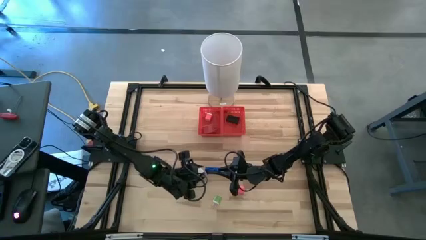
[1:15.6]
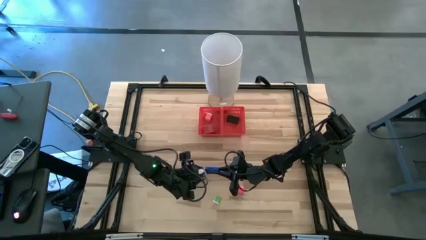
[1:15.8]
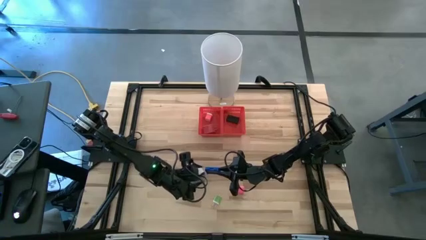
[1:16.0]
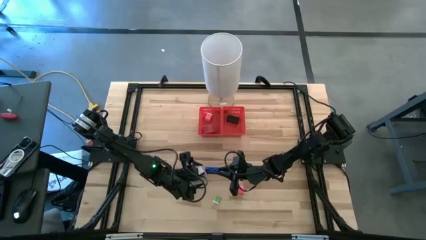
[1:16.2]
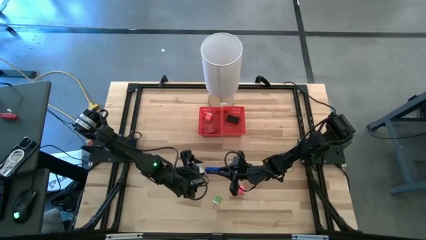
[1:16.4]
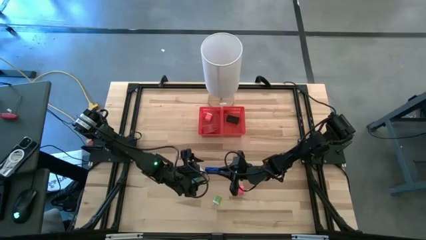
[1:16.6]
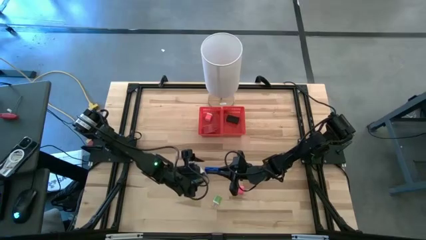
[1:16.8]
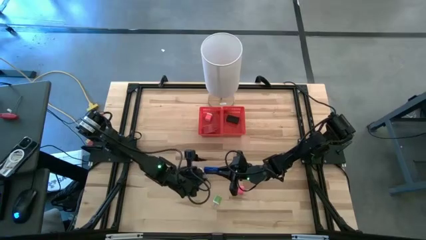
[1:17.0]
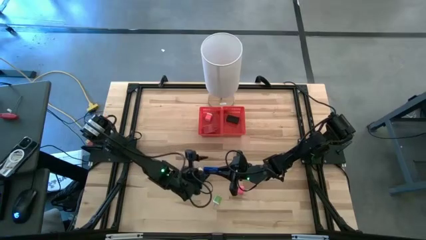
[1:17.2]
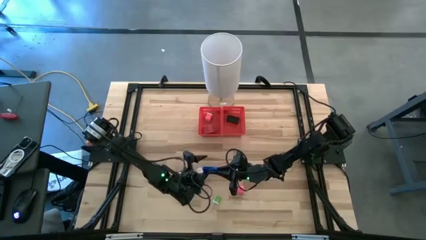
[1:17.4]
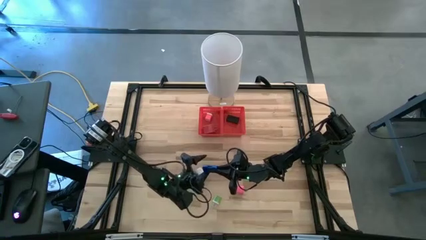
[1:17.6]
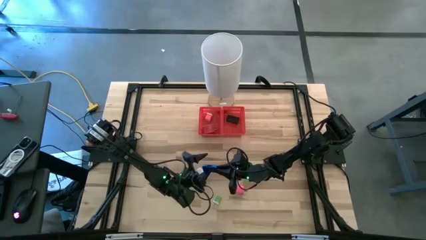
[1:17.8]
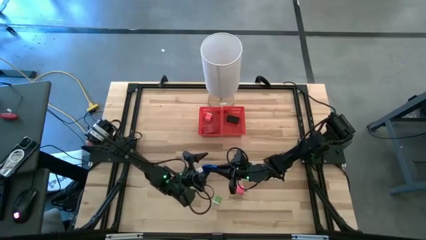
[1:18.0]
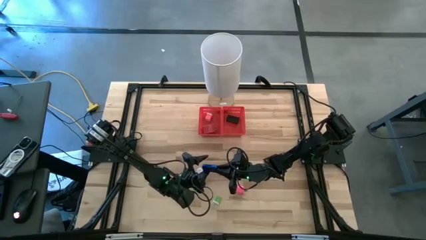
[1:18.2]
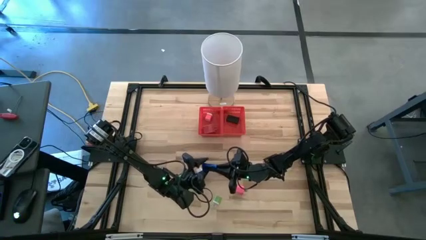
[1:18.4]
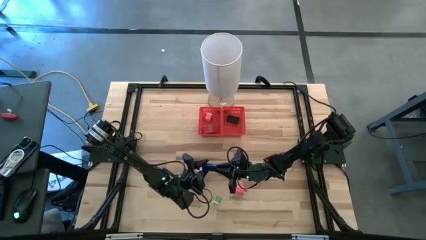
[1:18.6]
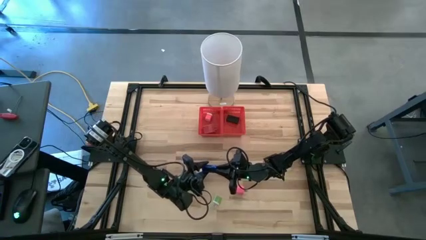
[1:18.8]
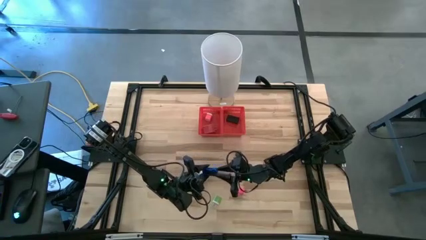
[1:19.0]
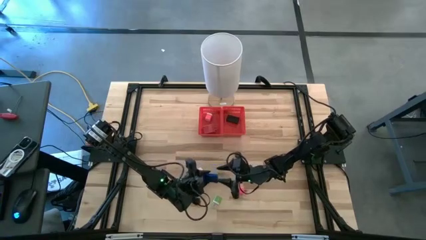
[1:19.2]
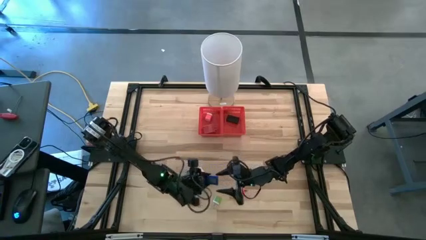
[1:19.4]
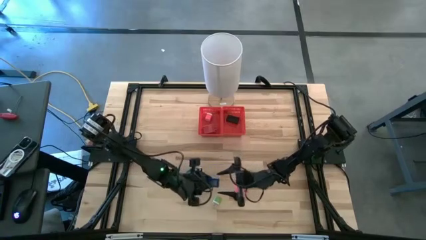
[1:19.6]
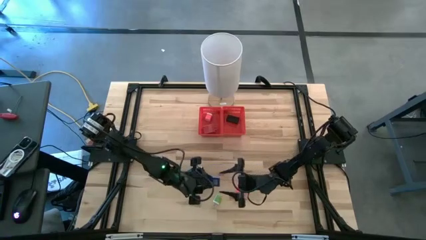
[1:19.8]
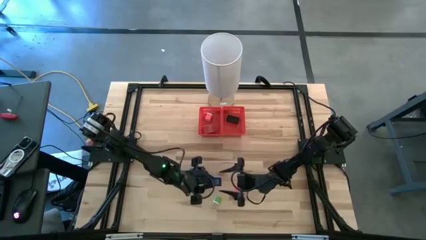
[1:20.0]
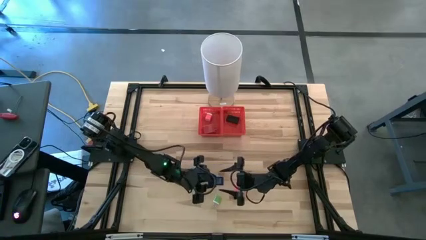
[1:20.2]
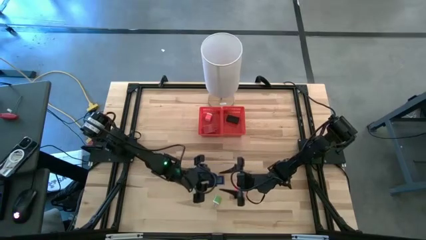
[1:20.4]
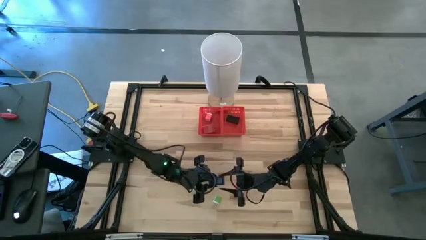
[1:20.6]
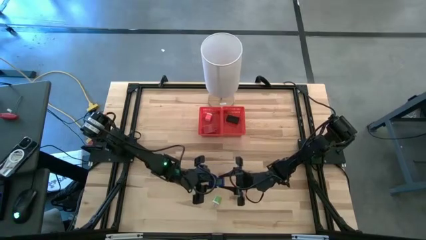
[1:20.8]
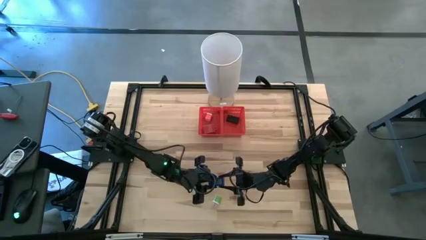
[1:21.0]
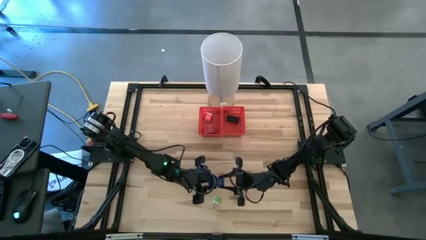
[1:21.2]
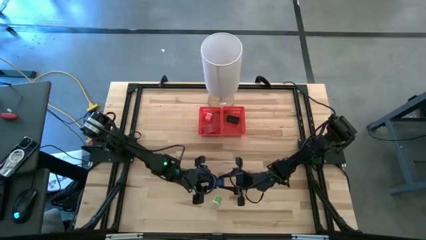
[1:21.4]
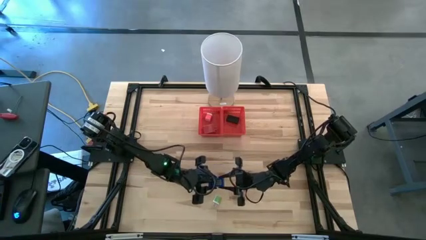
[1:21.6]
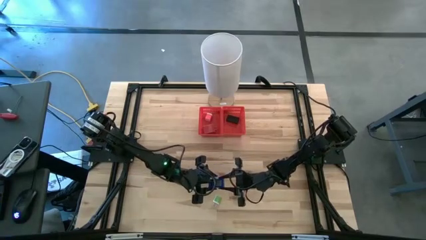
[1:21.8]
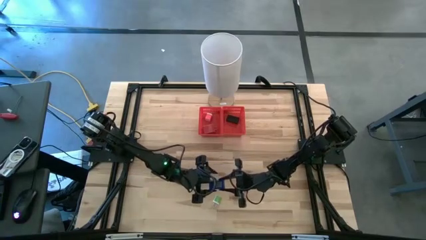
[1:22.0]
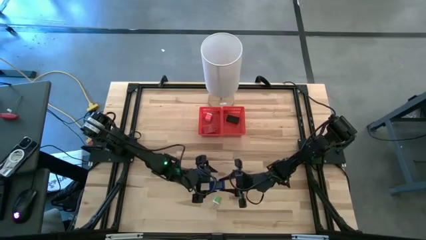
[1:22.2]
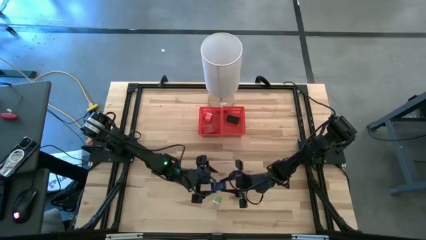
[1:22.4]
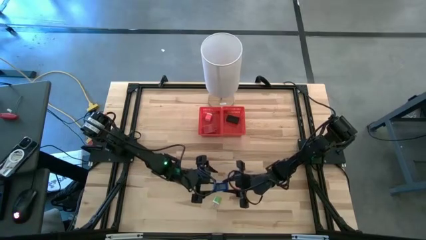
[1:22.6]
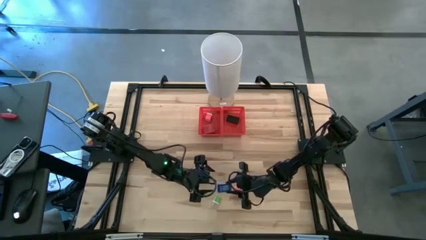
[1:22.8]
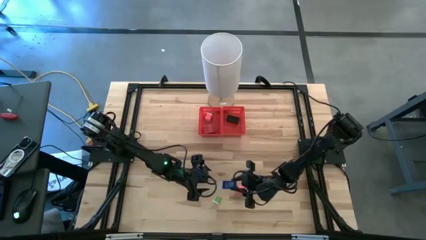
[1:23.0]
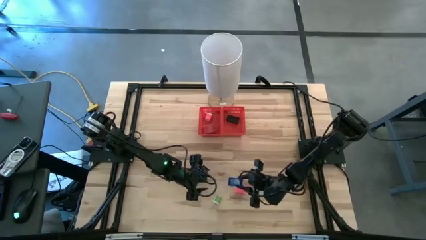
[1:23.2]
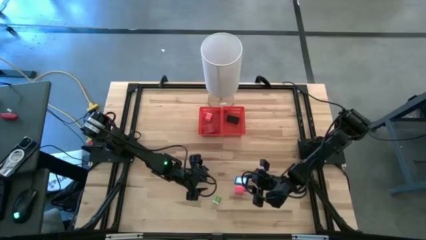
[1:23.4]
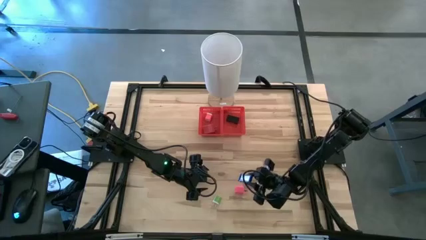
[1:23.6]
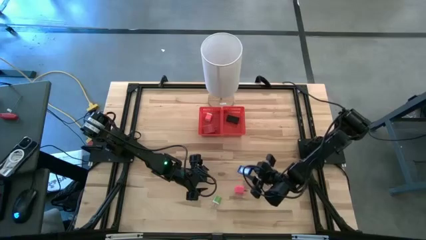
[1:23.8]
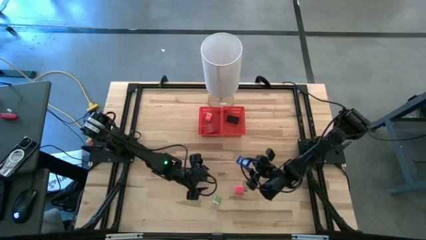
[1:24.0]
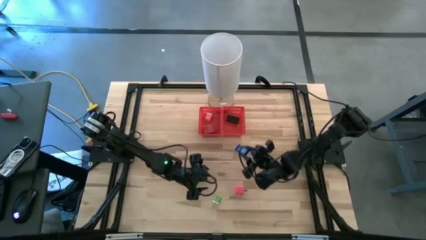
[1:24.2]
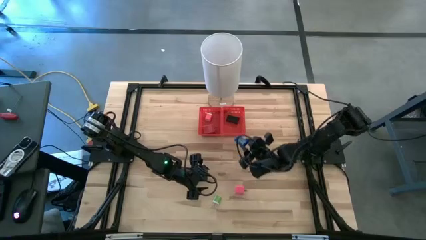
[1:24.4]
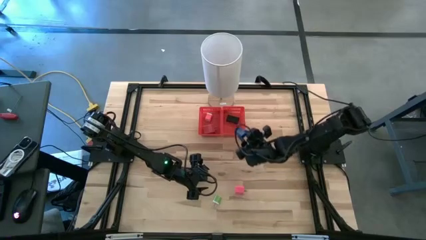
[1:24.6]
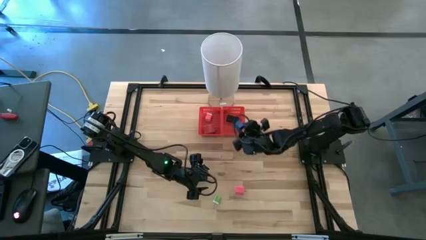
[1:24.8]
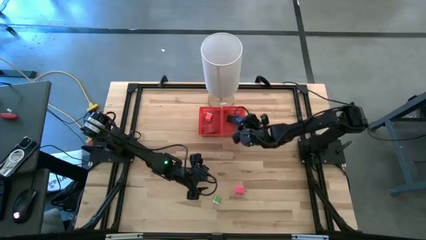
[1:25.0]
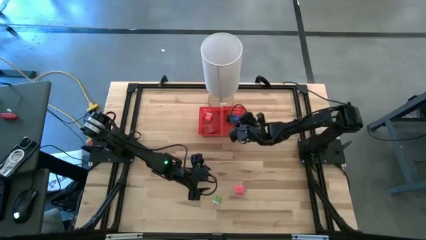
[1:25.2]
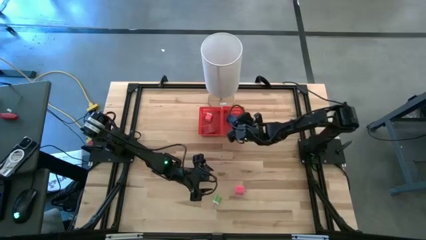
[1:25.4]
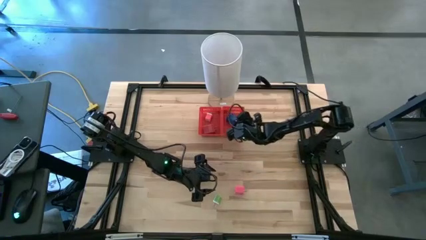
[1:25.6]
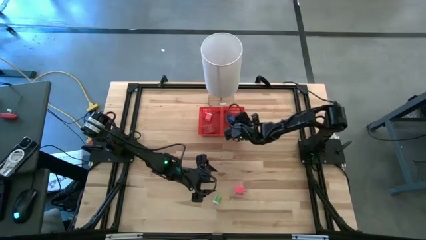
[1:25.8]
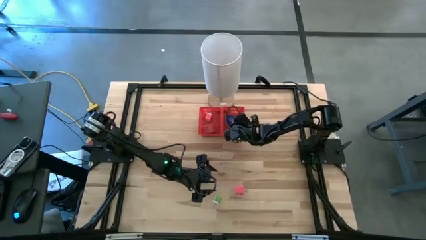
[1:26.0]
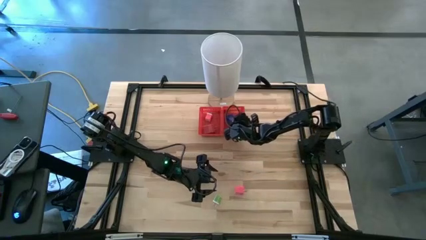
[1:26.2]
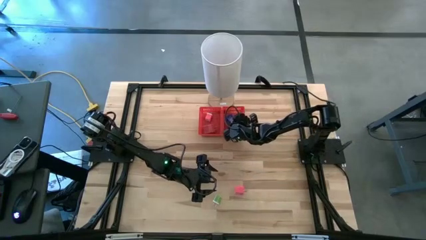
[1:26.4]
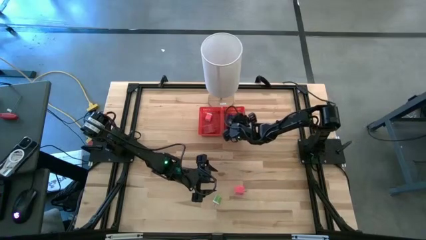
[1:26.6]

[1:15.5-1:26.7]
Task: Pick & Place Office items
Put the dark blue digital clock into the right red bin

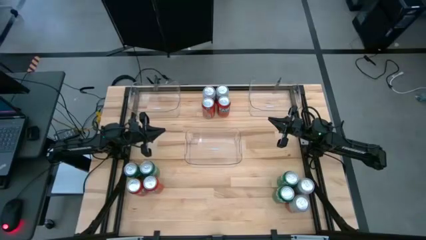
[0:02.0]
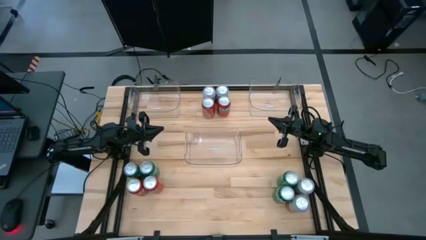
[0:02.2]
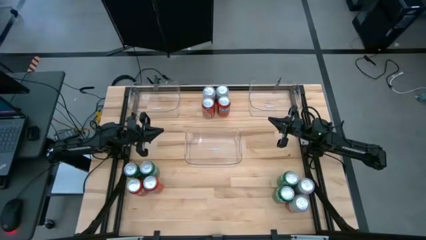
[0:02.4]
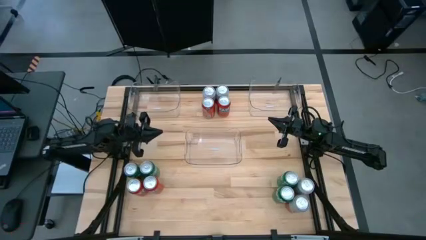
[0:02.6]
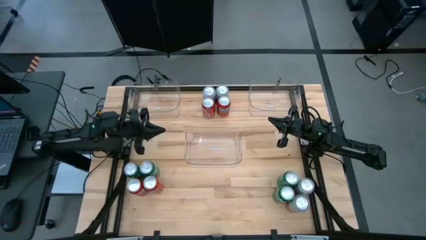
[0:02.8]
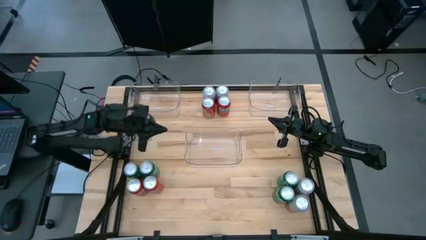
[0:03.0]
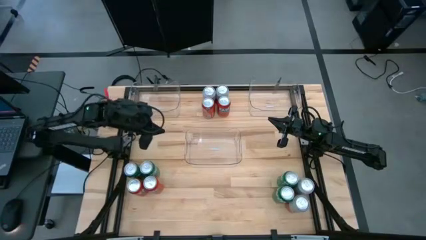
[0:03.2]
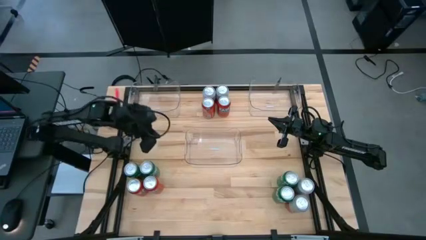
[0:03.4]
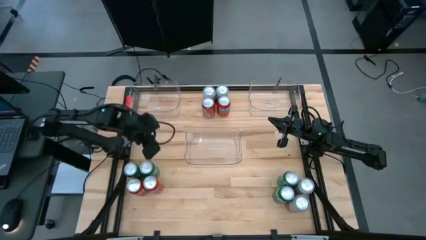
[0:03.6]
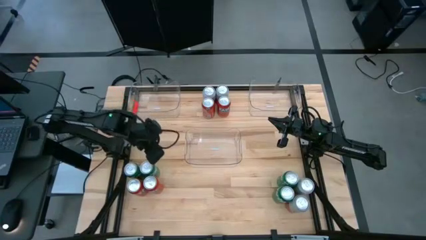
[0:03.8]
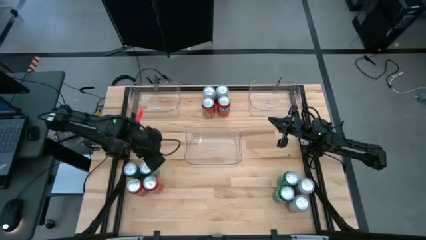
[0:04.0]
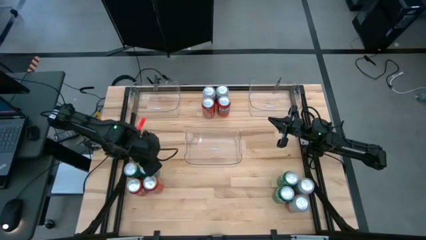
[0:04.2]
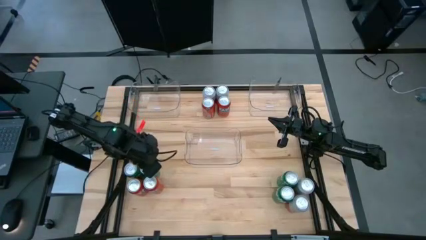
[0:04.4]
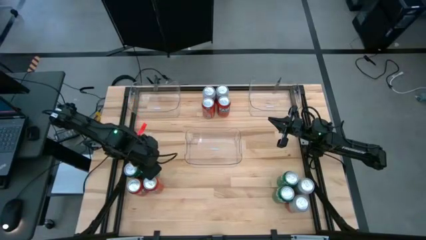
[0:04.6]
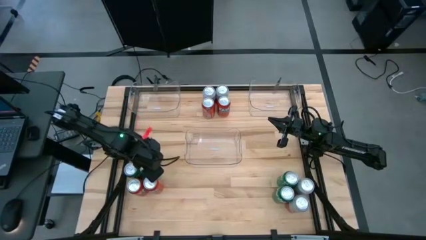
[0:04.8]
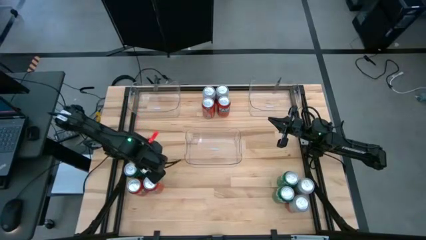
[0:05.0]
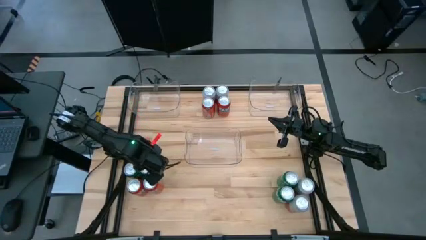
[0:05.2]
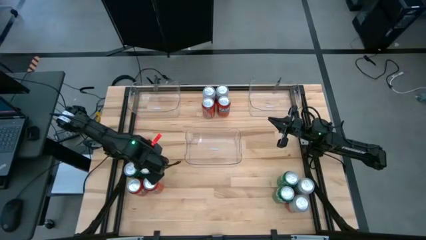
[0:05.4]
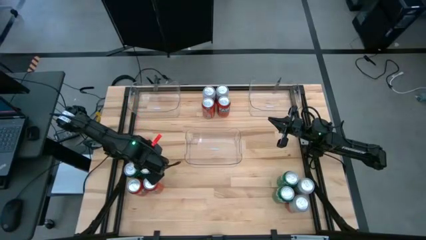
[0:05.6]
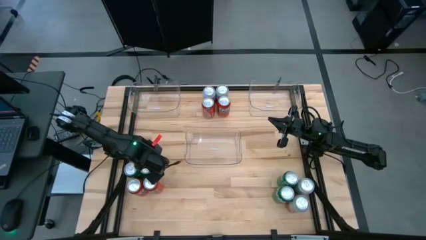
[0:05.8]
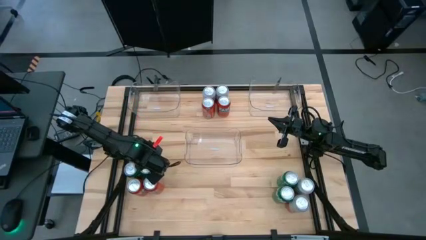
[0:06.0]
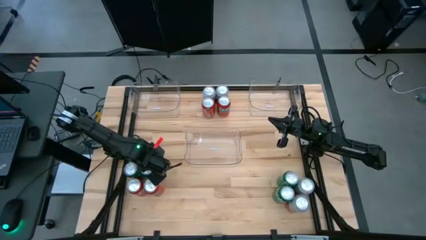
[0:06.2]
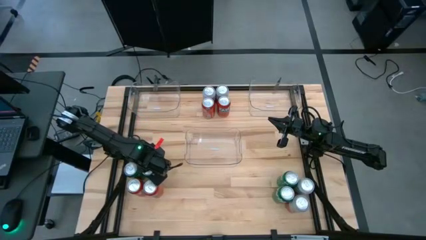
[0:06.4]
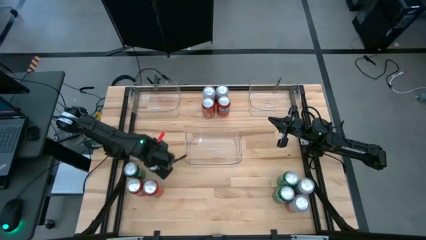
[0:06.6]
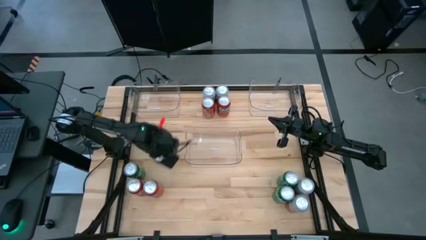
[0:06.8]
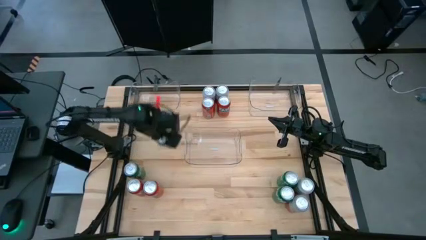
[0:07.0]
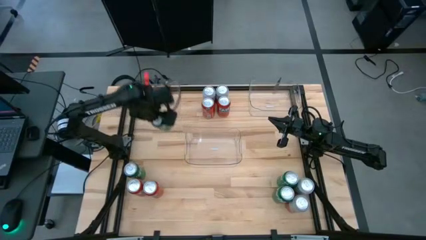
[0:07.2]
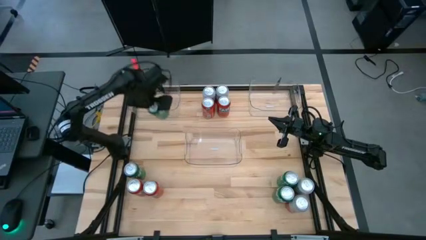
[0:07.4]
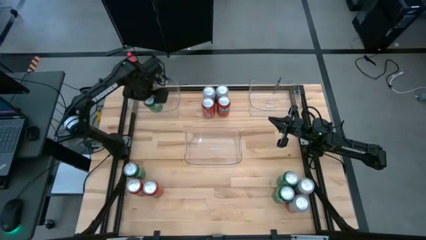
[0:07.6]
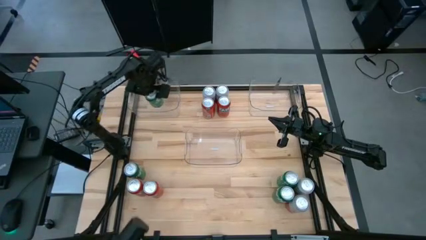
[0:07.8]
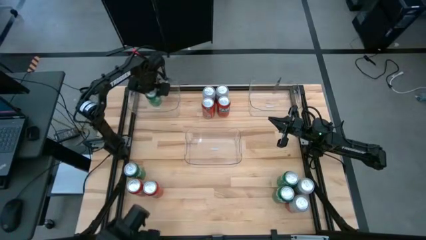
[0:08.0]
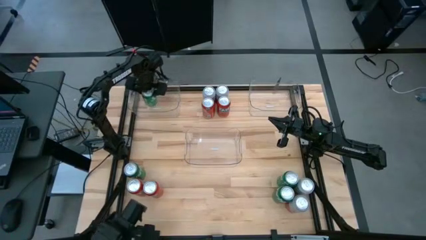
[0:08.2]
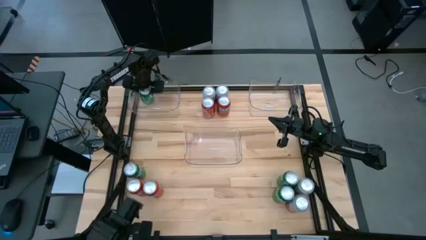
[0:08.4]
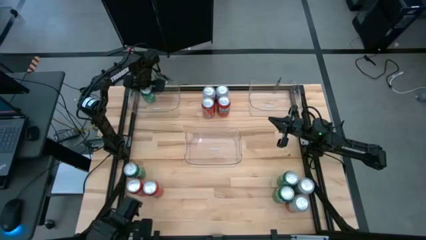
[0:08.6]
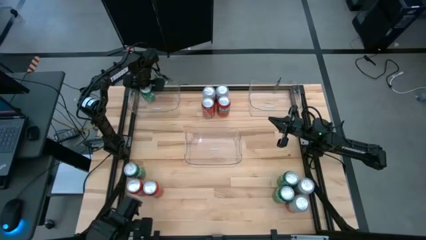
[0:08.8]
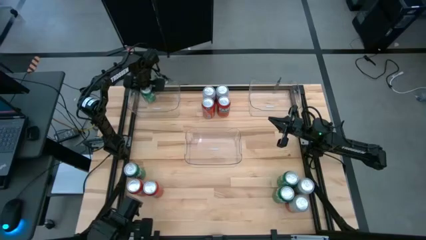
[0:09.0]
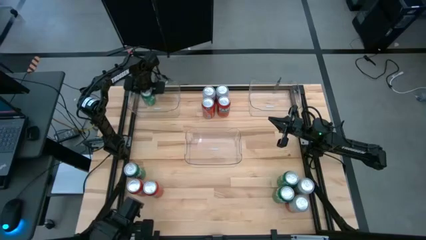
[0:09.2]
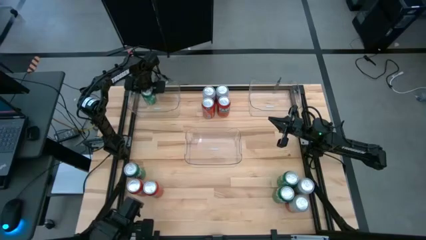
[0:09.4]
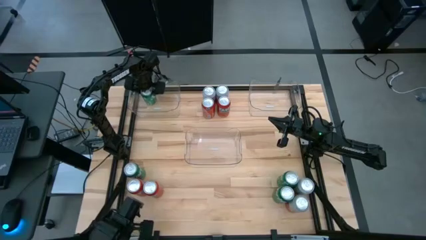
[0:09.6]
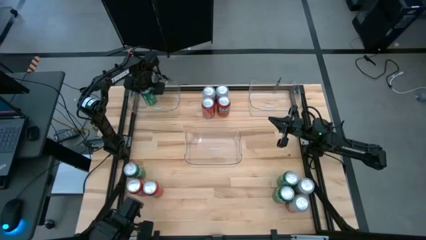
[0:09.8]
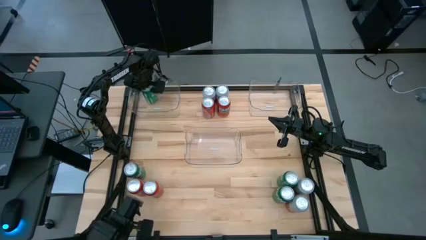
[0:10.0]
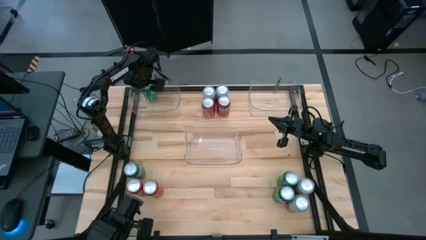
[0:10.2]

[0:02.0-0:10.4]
Task: Sort soda cans
Put the green soda can into the top left transparent bin
